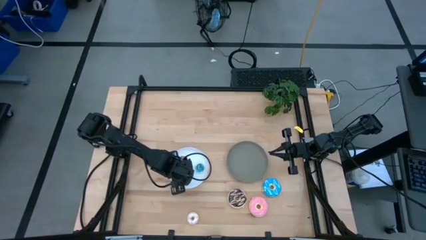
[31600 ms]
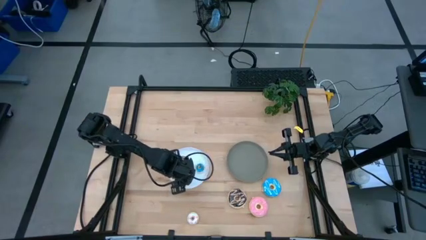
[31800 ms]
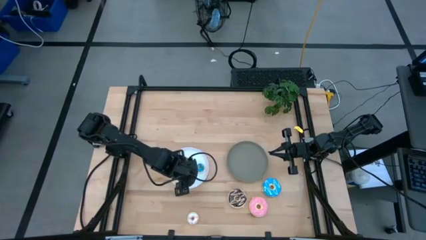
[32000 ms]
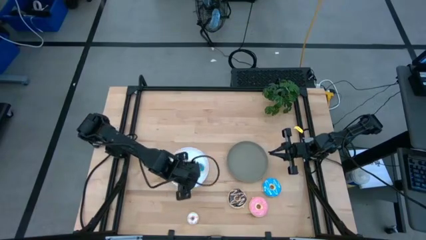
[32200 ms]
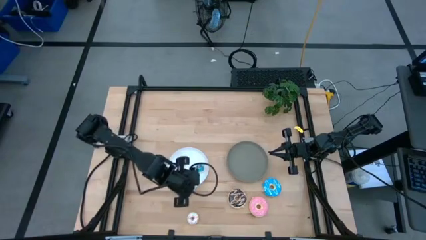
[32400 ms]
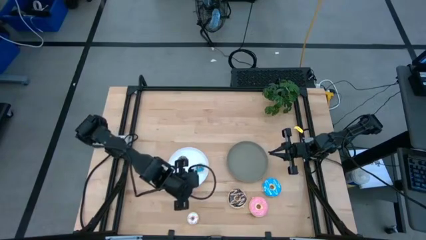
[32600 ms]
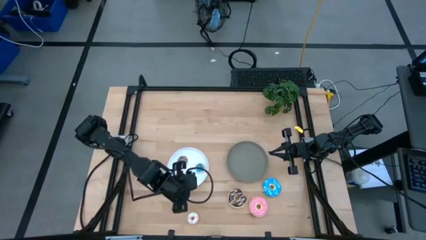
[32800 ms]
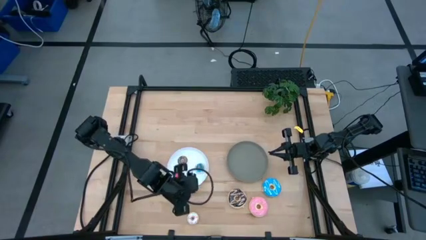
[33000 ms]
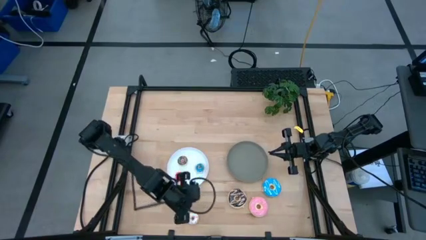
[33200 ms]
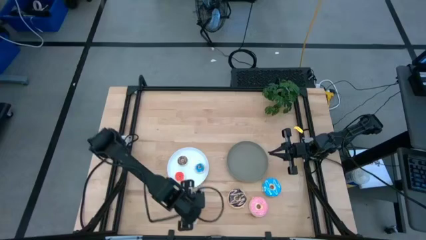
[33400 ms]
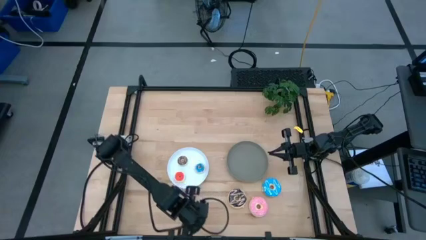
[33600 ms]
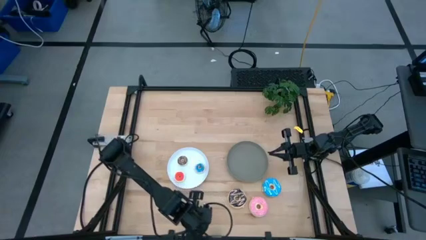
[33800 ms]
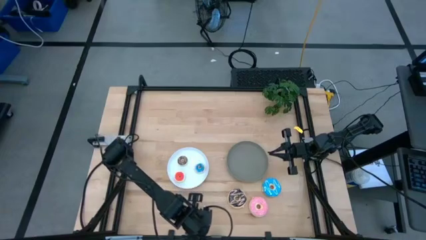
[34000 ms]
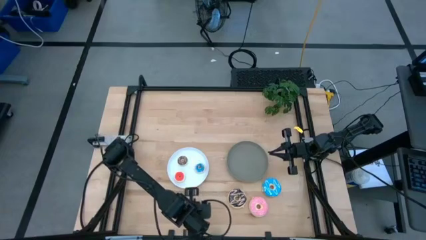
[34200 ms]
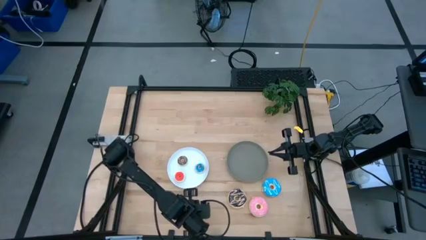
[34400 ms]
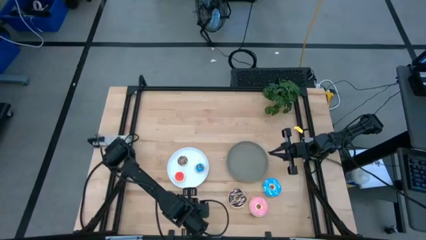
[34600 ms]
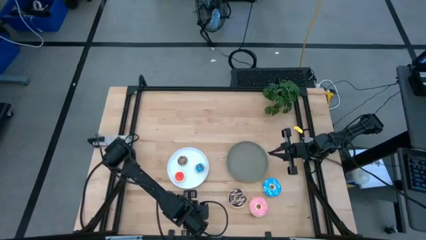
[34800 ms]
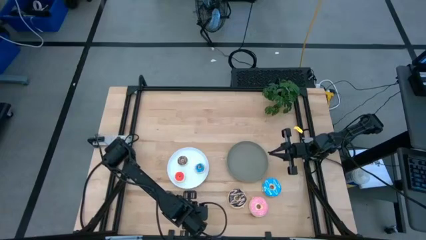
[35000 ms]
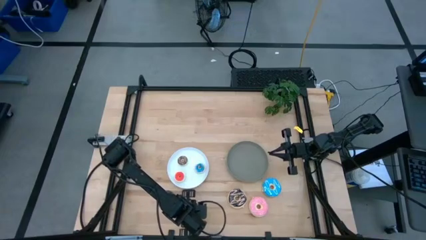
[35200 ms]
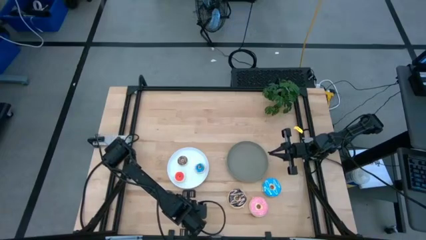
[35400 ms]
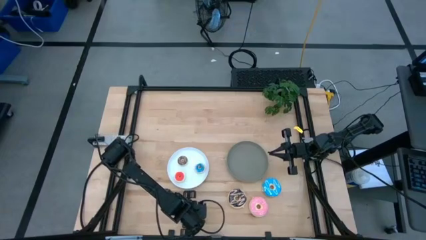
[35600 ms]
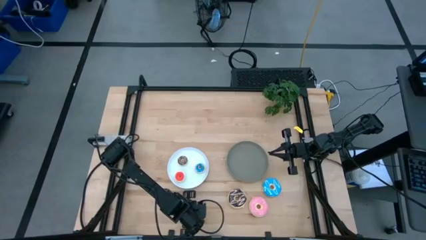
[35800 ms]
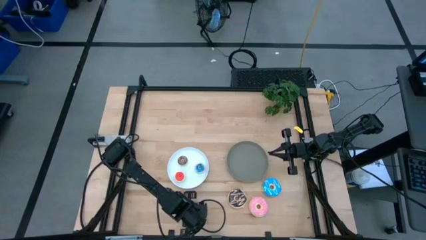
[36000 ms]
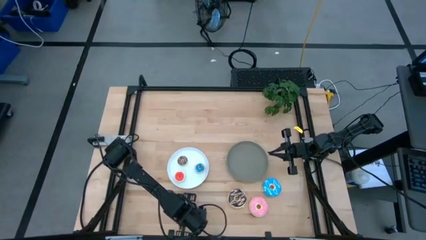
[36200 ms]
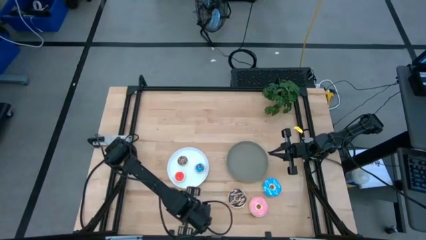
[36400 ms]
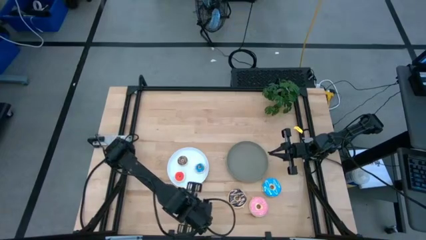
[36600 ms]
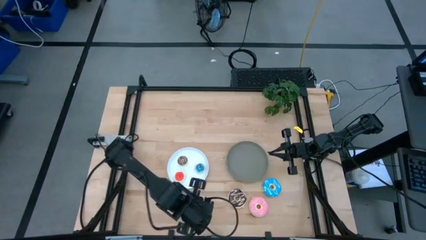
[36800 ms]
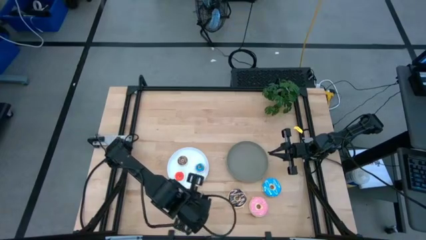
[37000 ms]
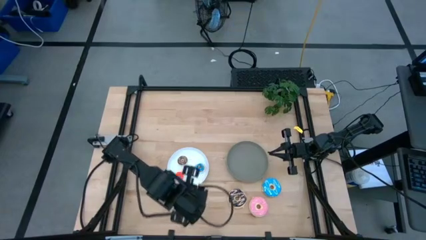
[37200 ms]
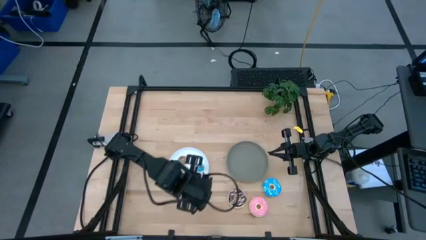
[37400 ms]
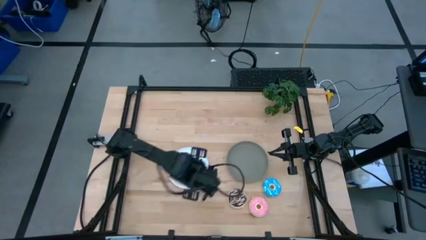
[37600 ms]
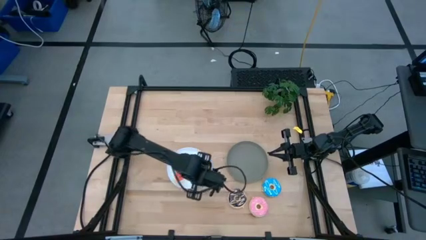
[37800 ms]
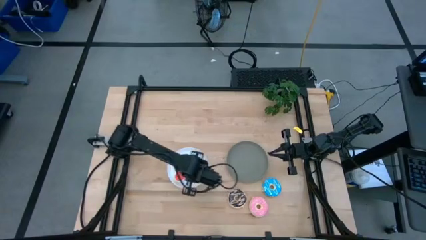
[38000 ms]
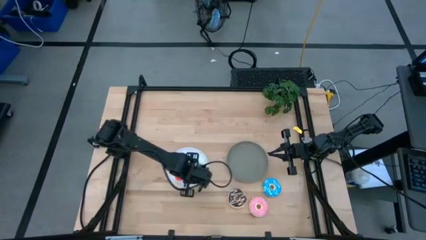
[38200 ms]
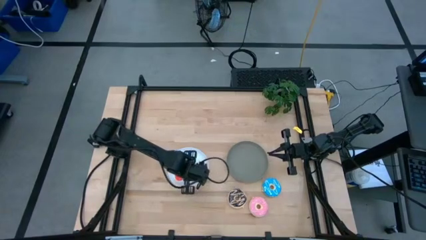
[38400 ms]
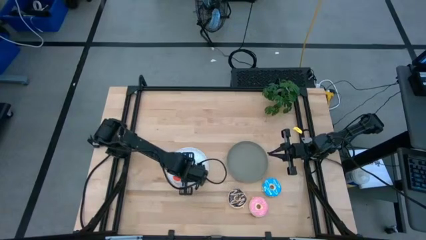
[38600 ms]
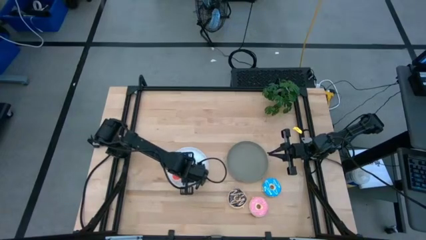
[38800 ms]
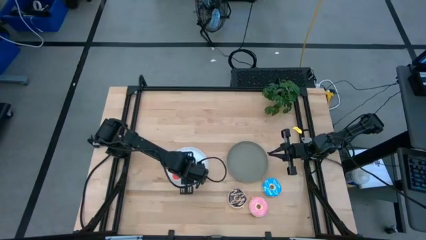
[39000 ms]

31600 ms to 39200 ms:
Task: Pick & Place donuts
Put the small white donut on the white plate

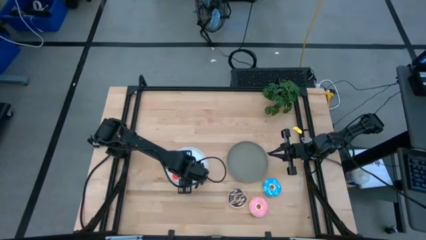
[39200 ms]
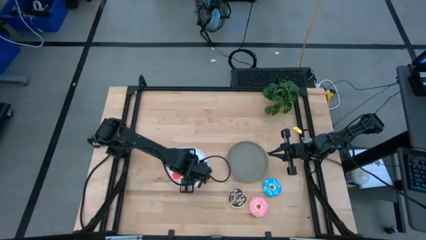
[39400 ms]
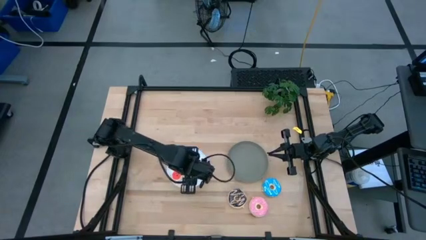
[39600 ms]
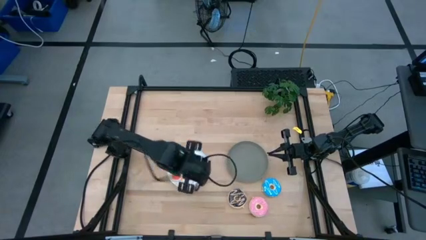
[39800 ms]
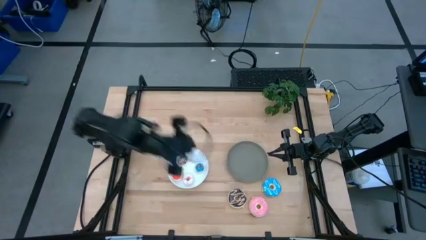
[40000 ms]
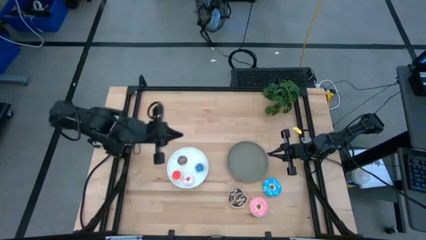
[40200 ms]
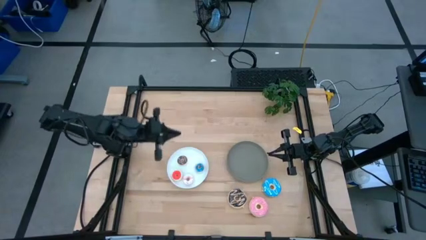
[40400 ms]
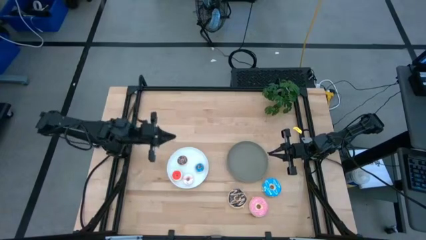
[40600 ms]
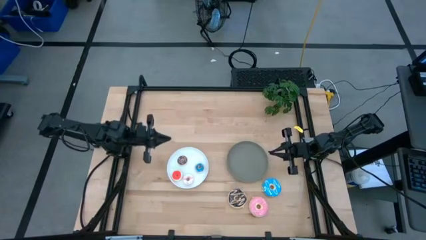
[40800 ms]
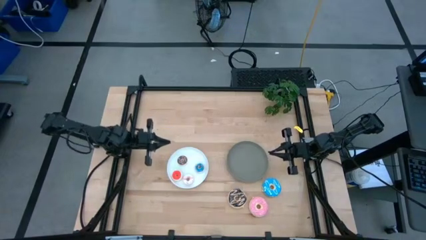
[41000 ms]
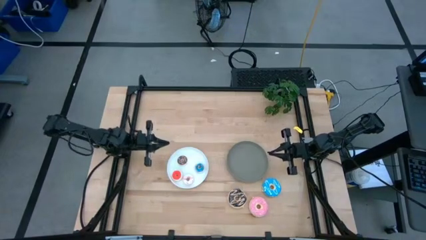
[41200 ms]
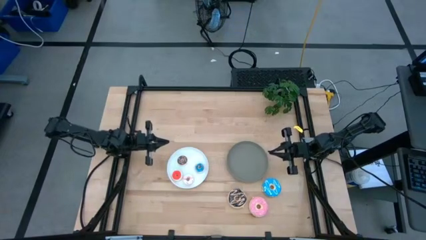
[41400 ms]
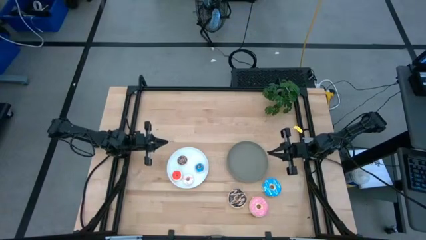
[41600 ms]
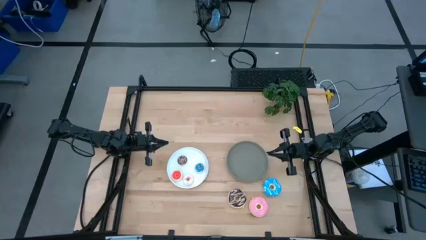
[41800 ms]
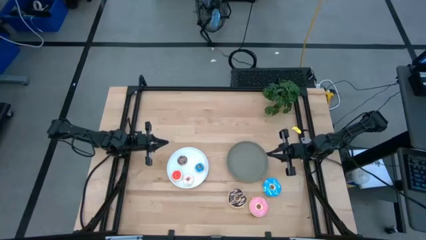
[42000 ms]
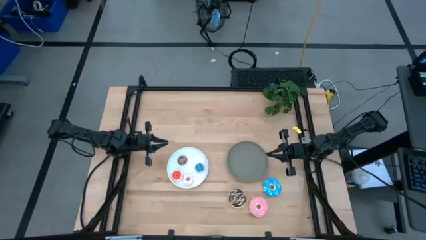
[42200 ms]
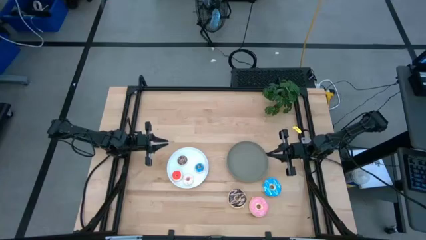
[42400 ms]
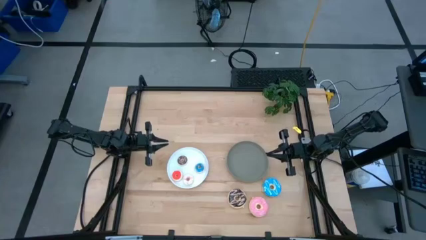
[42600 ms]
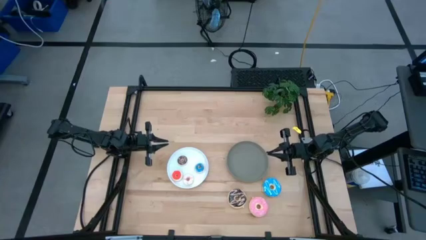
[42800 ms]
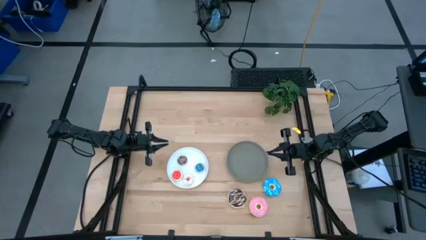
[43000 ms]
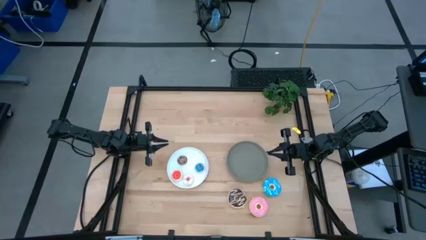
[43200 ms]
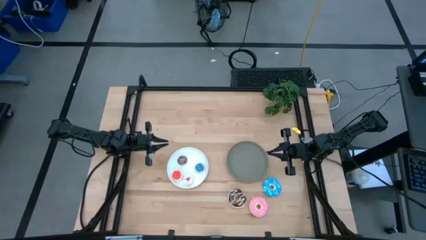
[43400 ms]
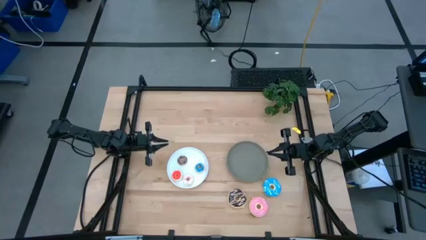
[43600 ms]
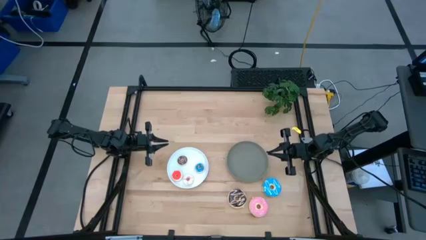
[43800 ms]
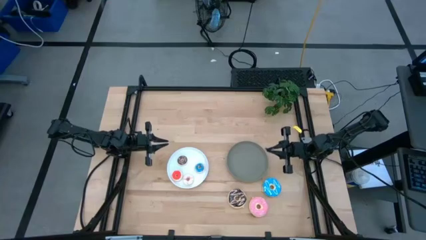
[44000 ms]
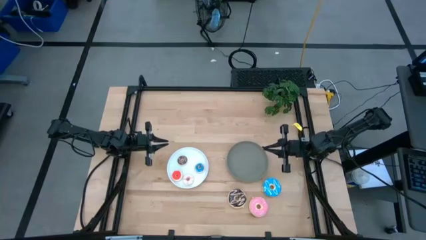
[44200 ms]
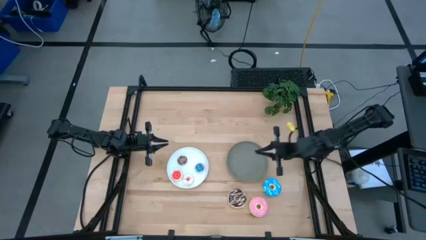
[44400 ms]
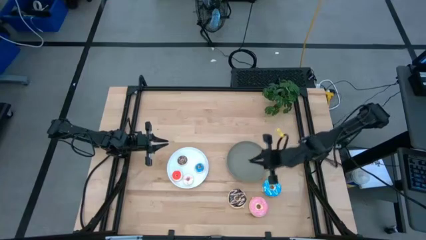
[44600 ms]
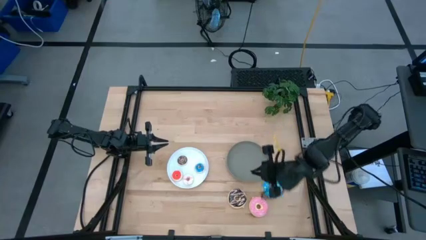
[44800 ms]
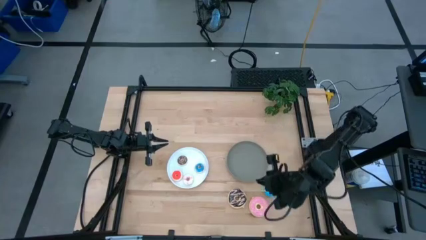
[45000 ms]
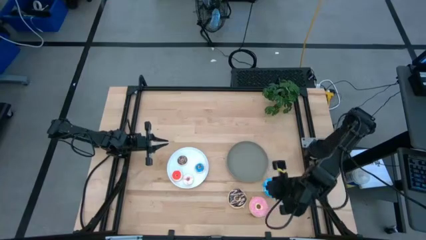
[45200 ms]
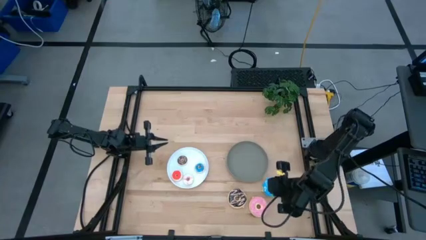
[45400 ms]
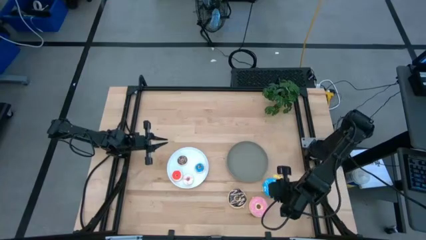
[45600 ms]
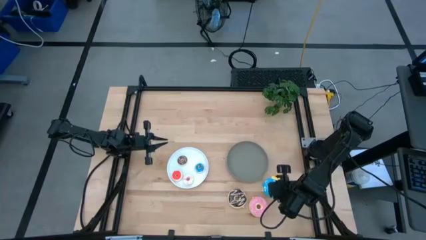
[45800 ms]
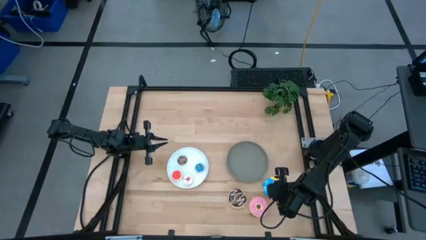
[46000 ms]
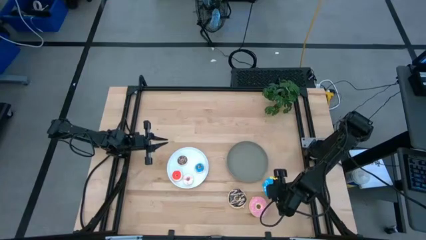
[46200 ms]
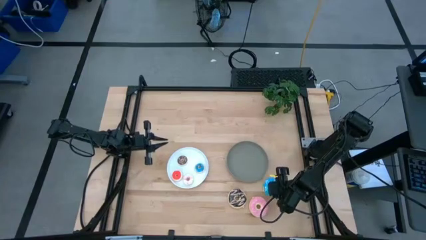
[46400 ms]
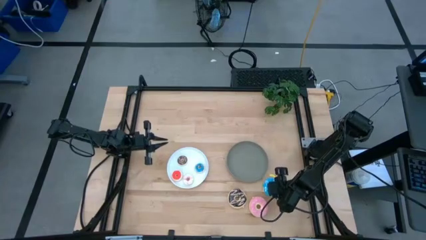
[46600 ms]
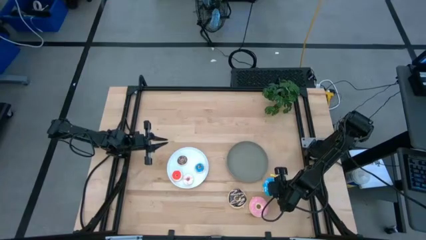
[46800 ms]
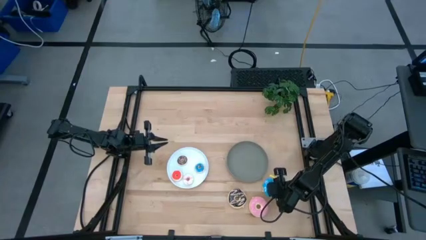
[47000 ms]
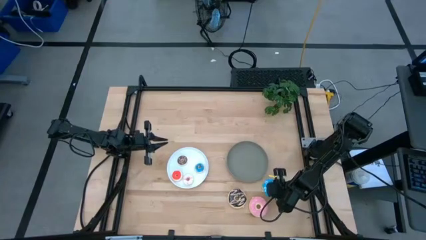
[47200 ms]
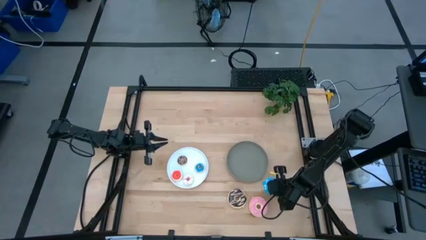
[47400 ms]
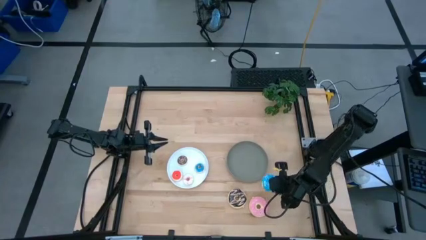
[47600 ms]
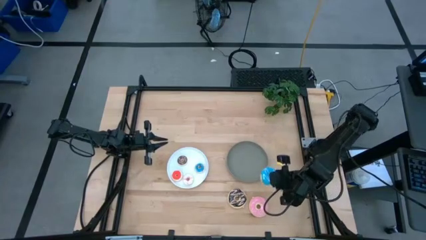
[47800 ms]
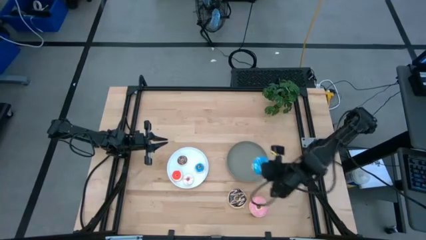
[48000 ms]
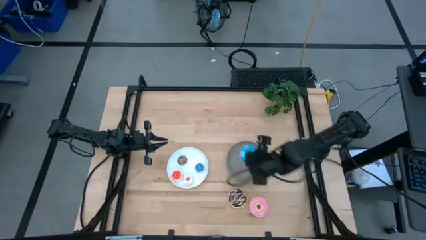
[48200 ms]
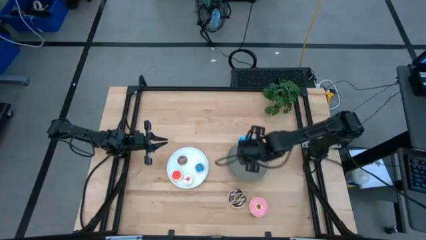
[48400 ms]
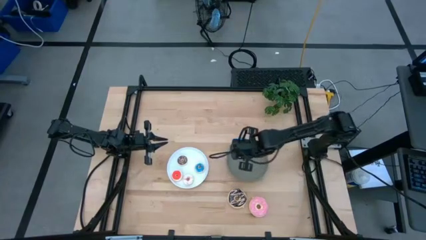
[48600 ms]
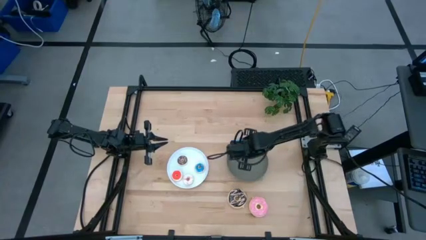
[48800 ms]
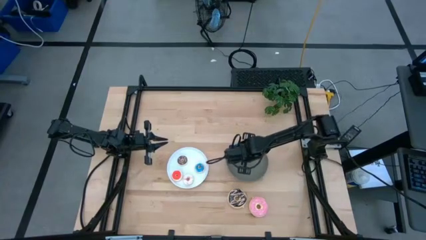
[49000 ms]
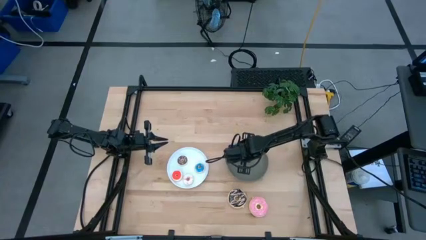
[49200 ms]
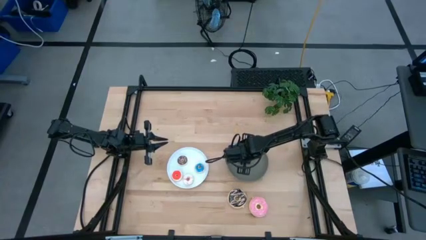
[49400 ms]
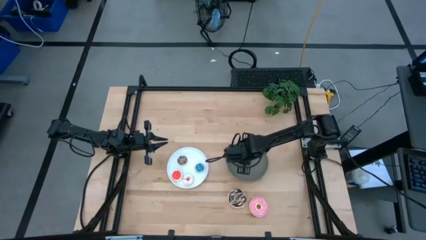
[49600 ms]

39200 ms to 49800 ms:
Put the large blue donut on the brown plate
